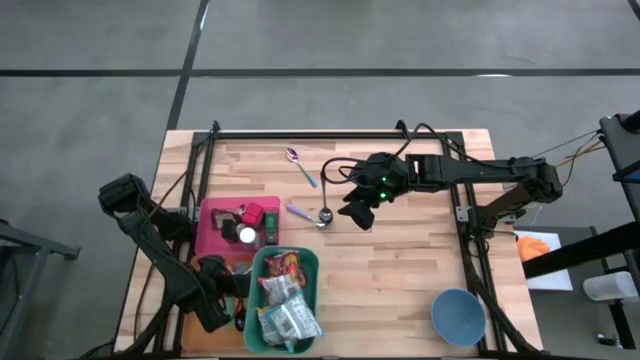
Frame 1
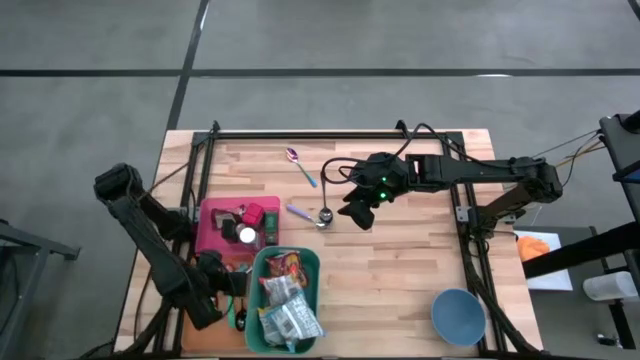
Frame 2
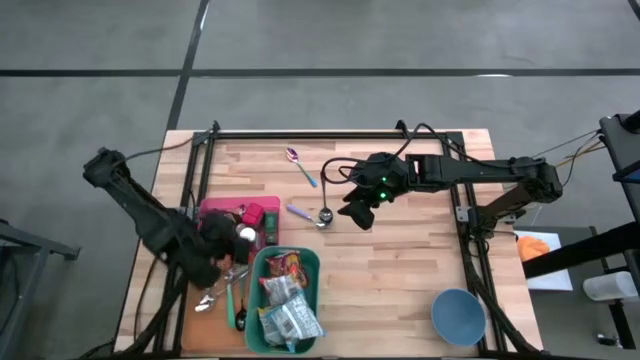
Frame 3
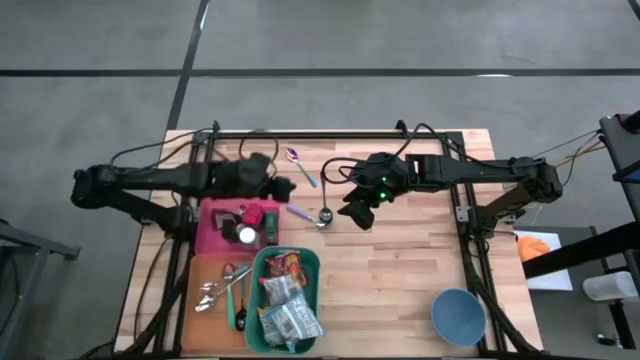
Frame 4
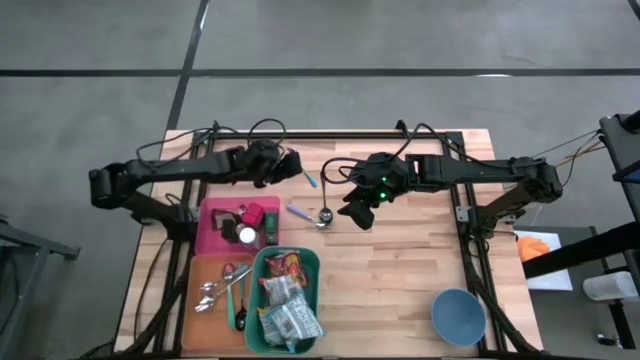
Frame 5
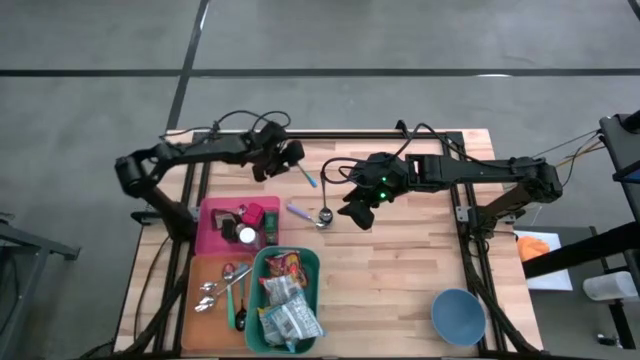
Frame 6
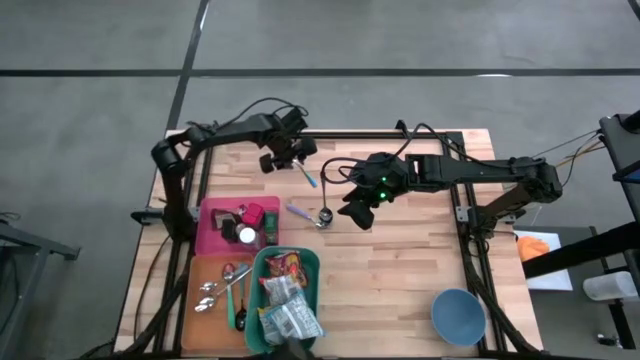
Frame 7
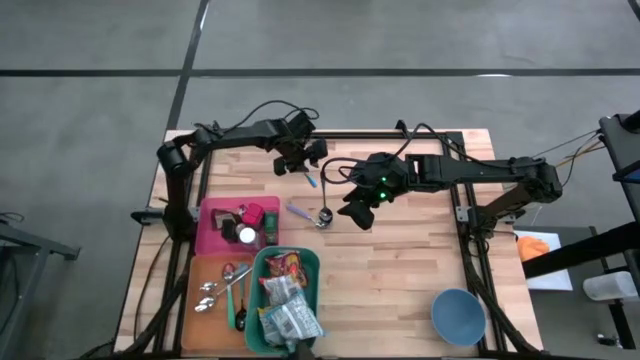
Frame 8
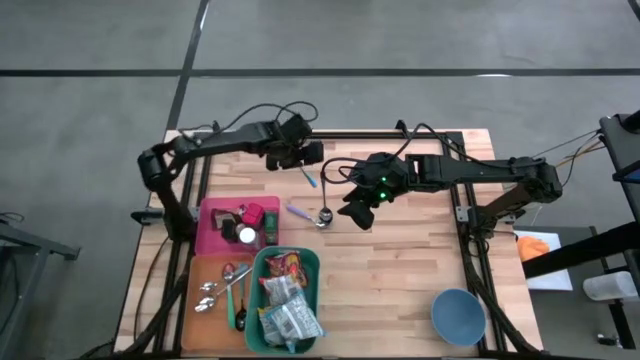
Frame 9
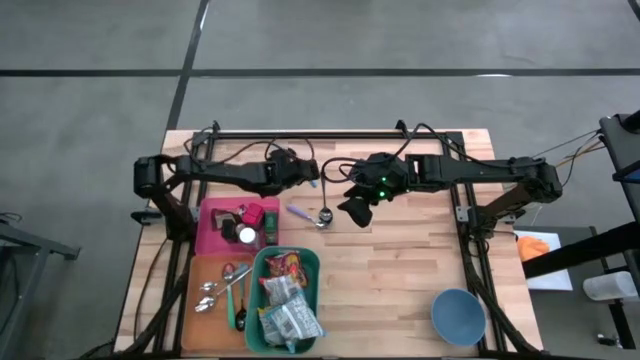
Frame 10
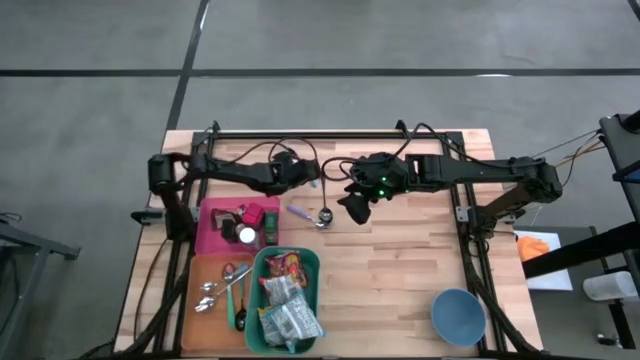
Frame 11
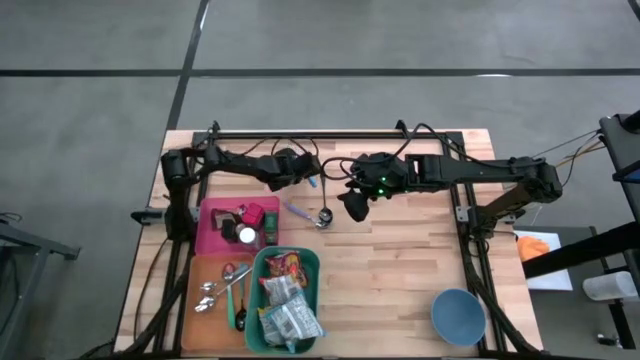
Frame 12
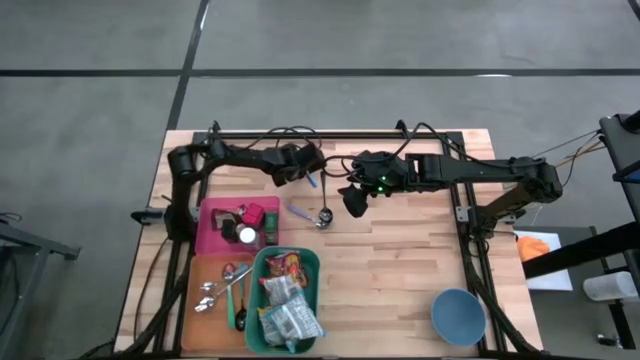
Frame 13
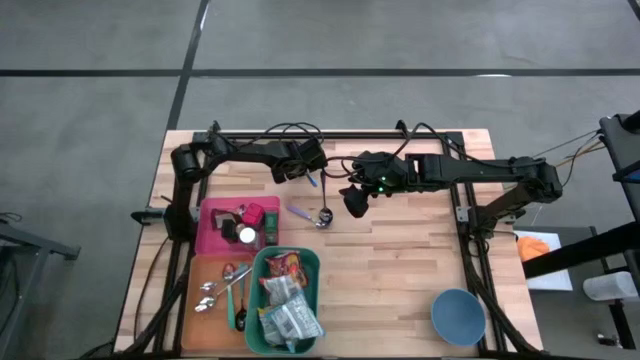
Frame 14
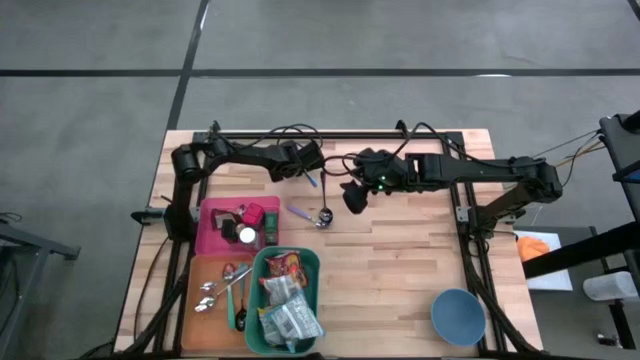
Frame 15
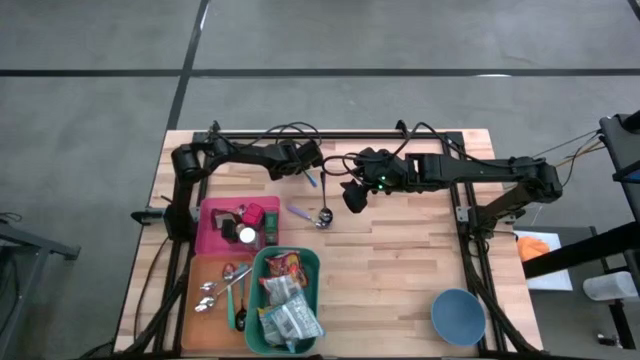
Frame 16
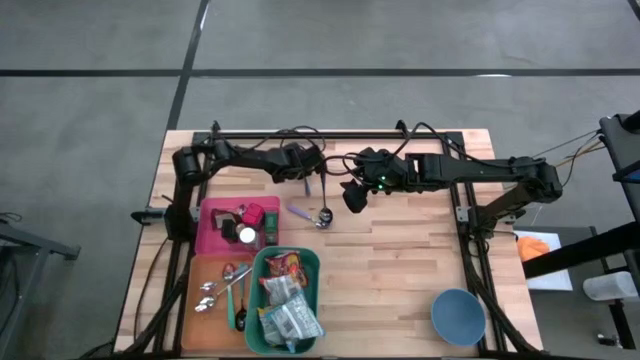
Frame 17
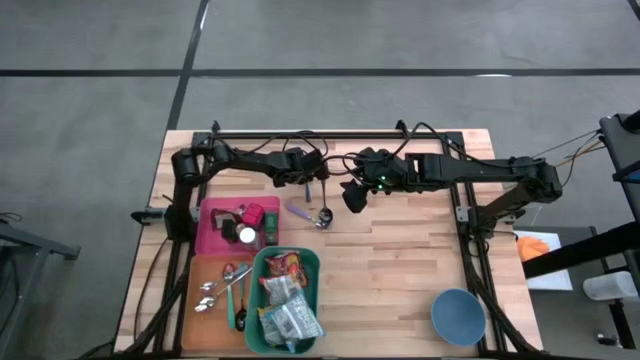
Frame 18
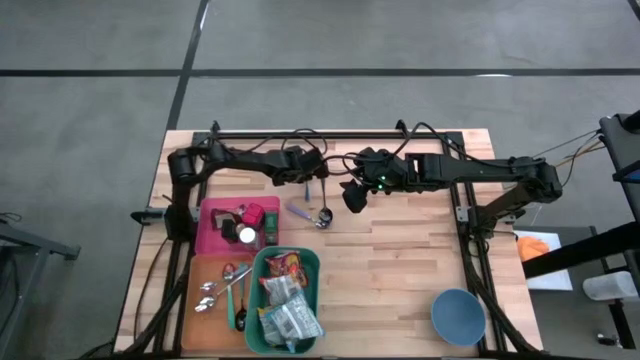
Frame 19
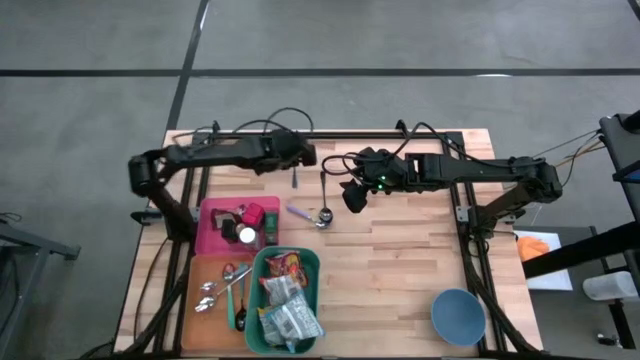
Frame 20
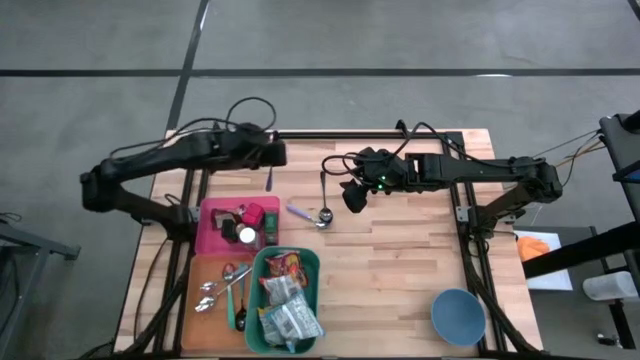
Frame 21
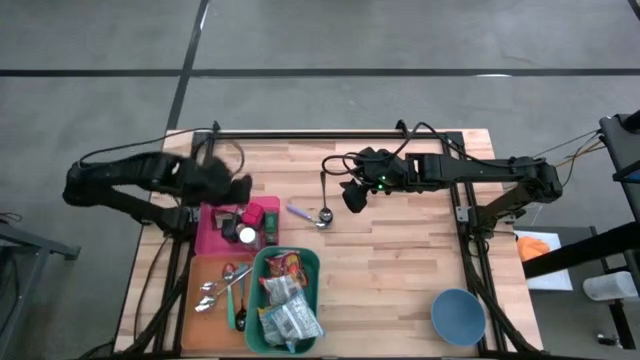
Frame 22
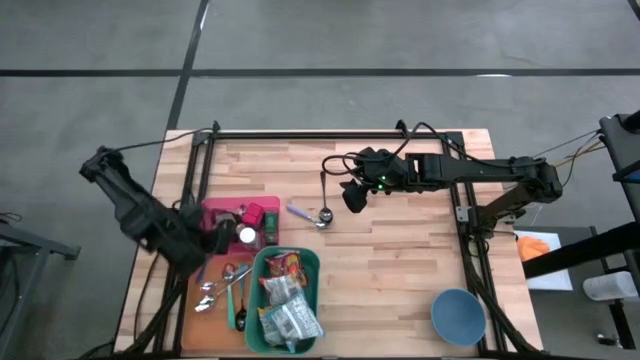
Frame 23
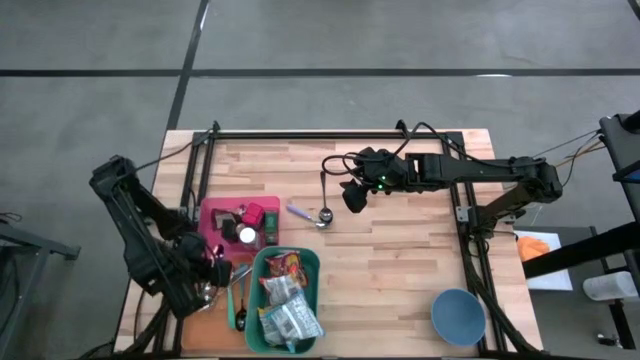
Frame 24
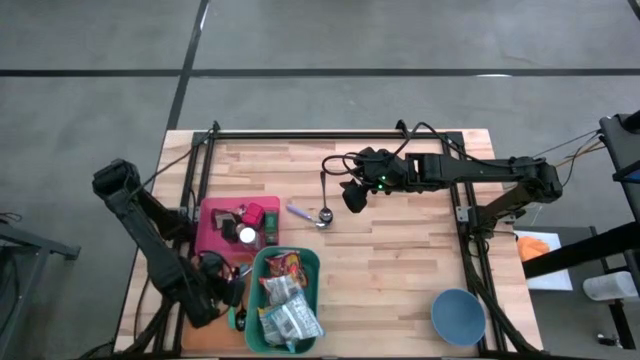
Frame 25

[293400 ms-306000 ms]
Put the blue spoon into the orange bin

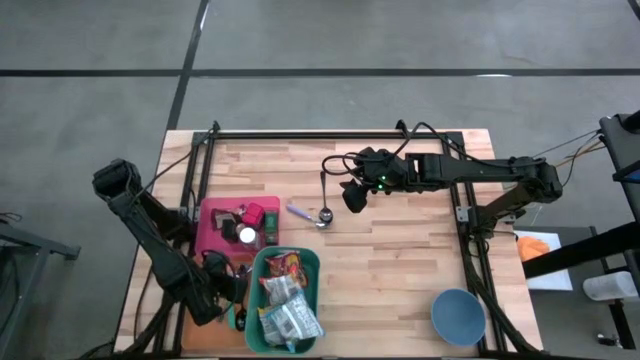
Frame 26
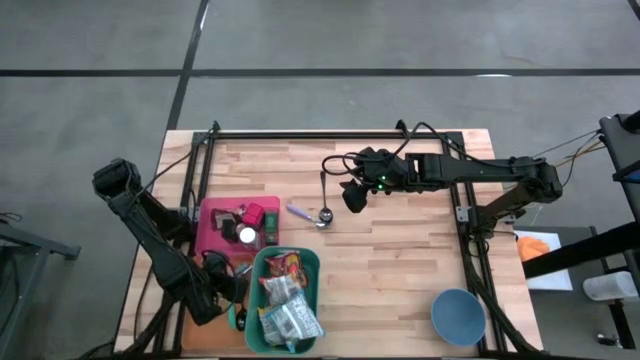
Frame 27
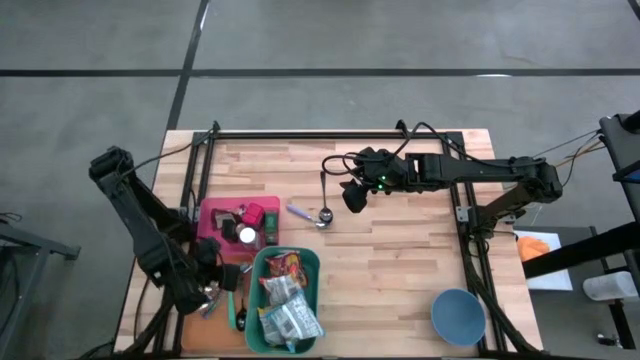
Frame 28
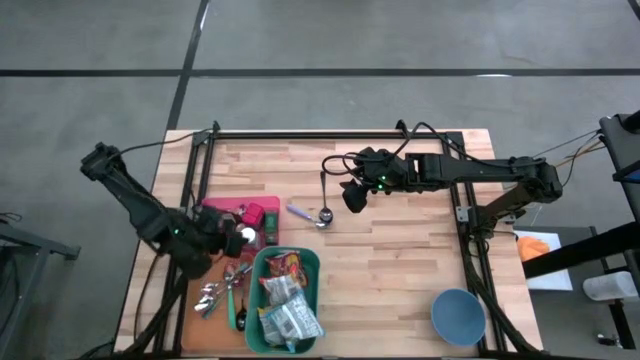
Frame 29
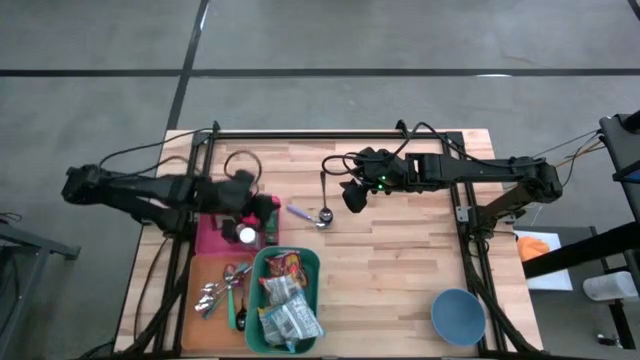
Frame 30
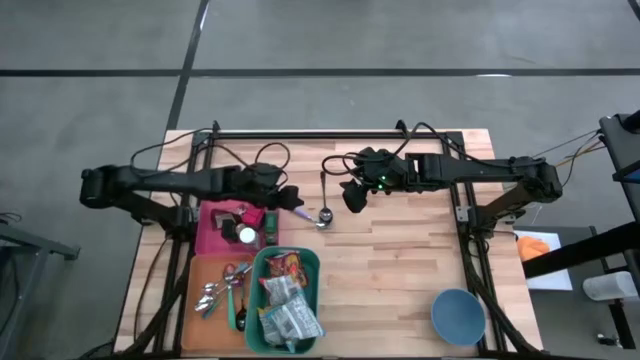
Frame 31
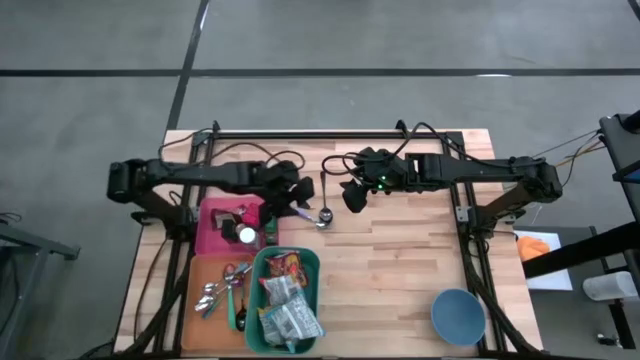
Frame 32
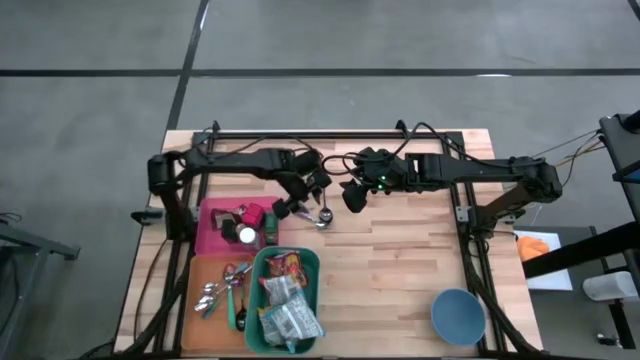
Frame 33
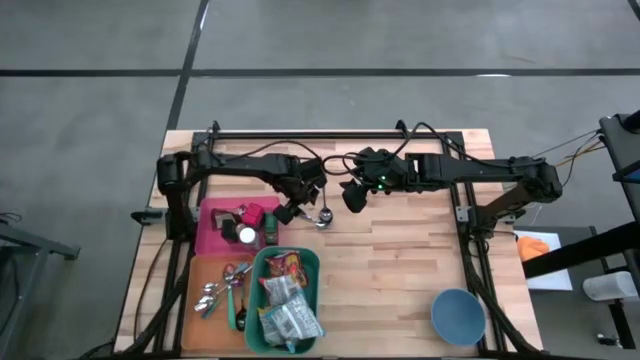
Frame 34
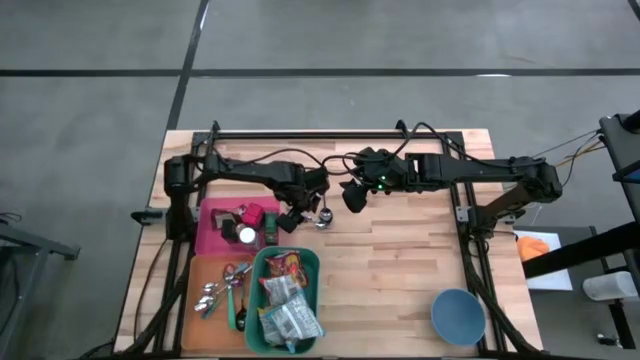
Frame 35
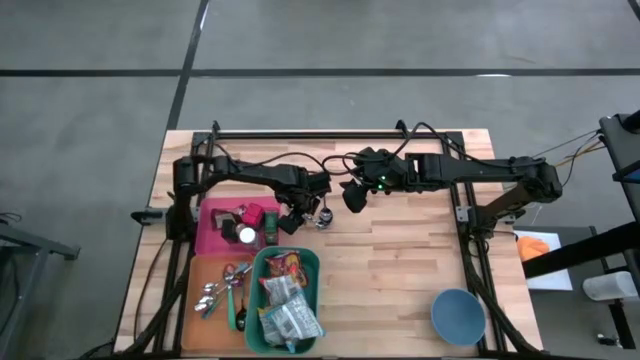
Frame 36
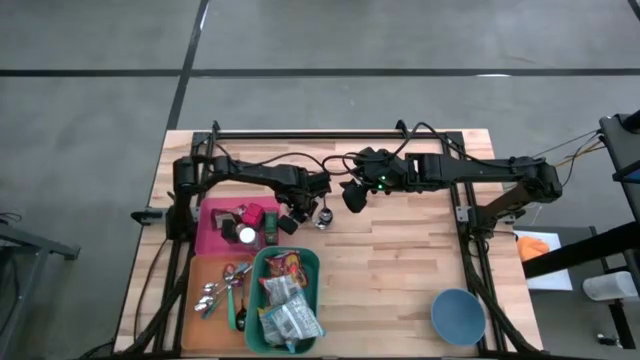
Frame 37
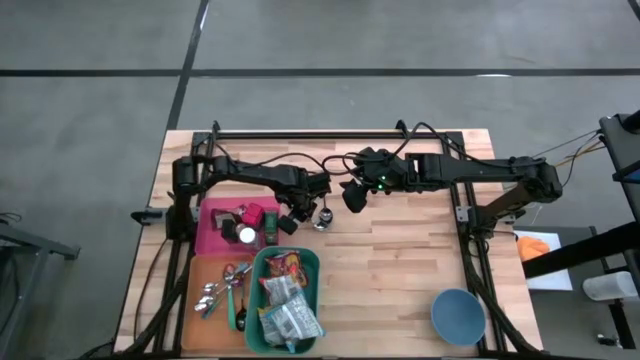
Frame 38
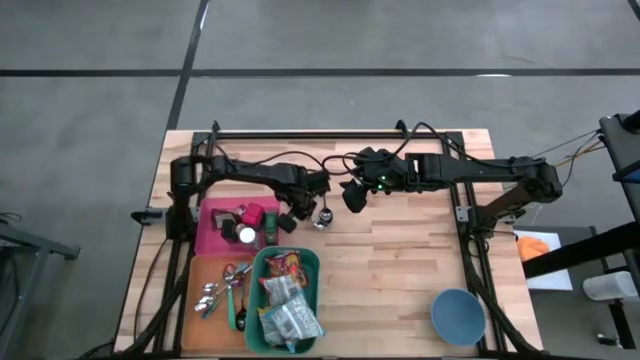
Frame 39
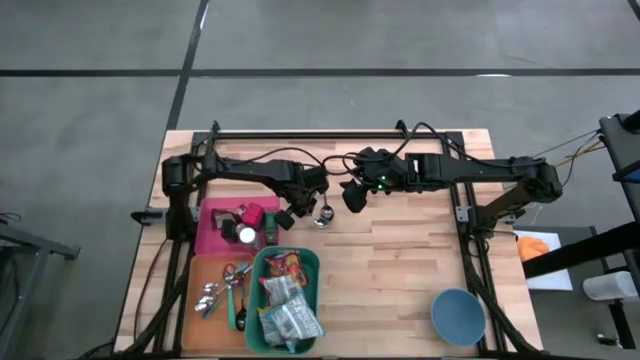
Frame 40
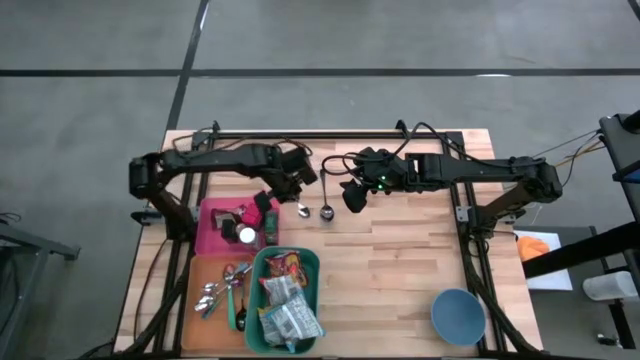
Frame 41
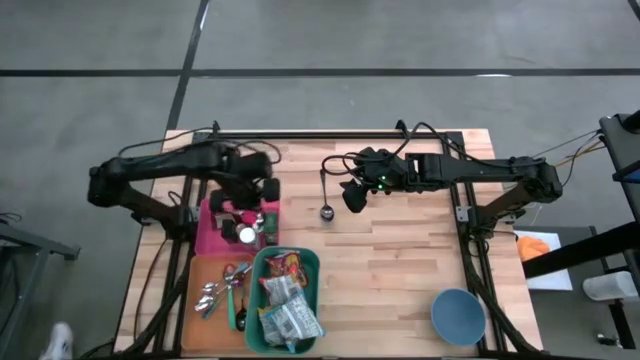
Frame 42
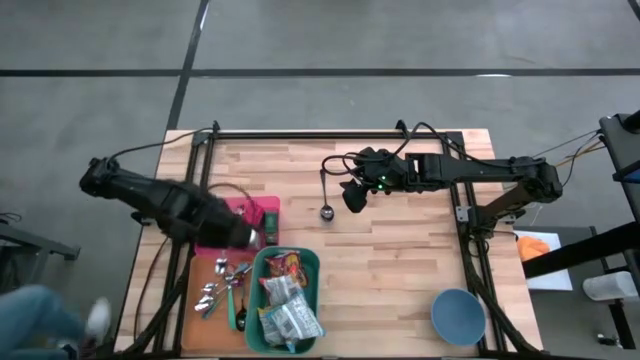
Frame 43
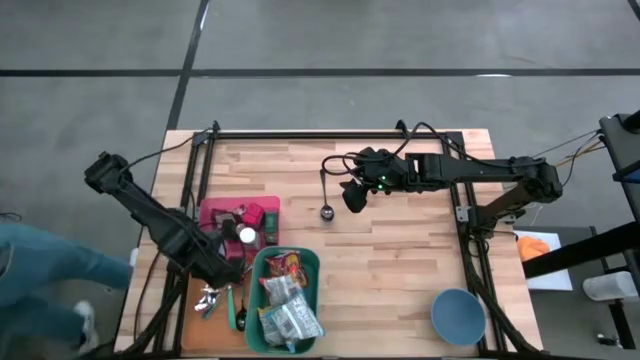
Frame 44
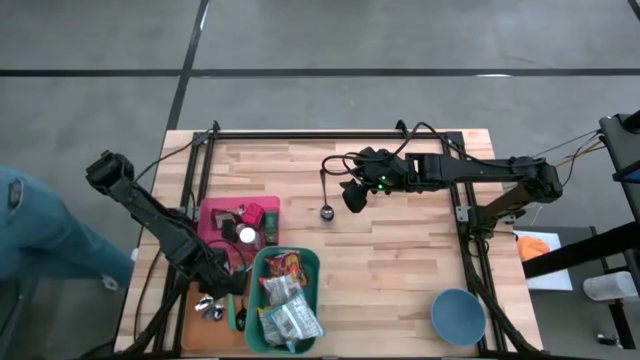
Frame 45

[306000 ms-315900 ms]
Put the light purple spoon into the orange bin
